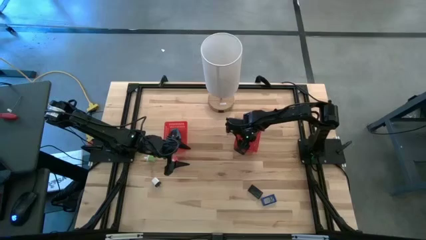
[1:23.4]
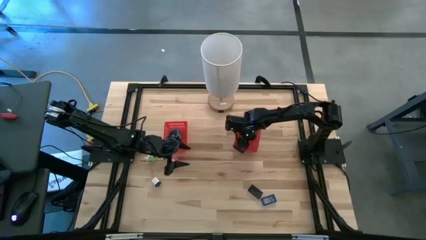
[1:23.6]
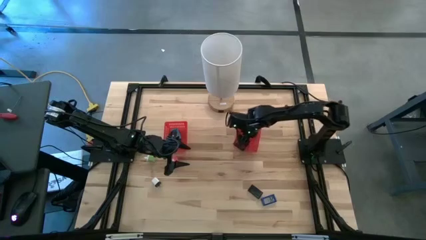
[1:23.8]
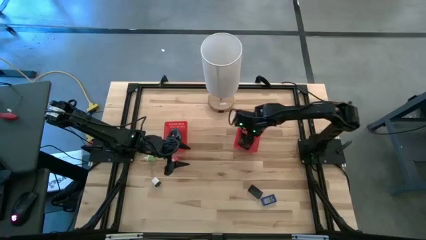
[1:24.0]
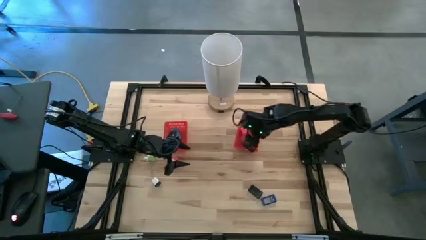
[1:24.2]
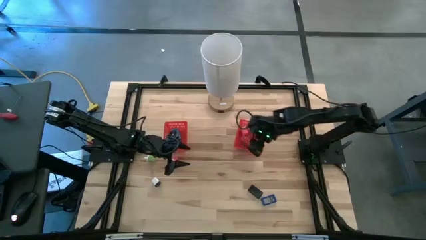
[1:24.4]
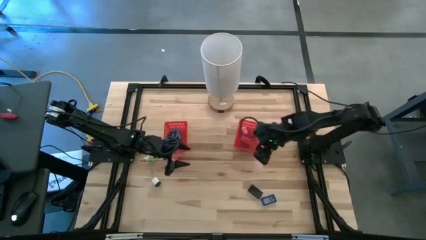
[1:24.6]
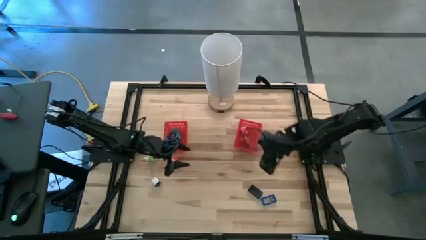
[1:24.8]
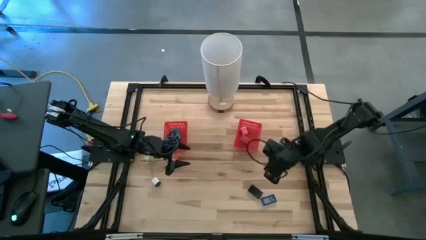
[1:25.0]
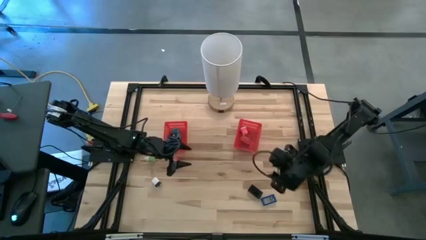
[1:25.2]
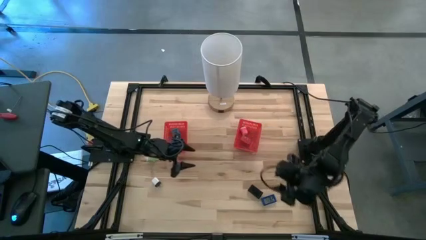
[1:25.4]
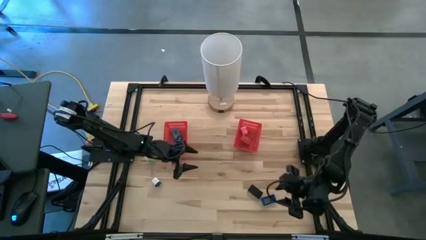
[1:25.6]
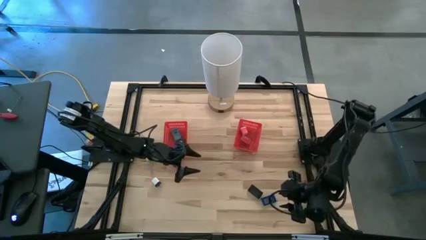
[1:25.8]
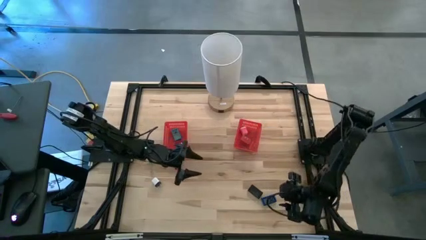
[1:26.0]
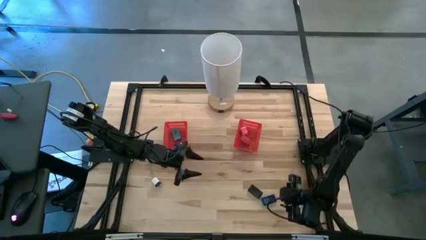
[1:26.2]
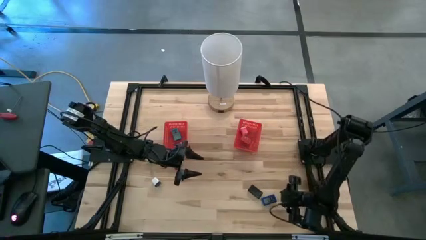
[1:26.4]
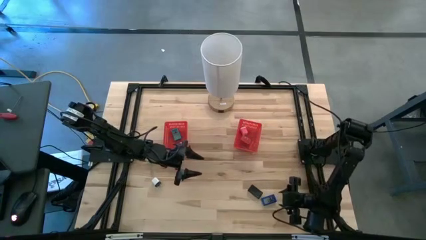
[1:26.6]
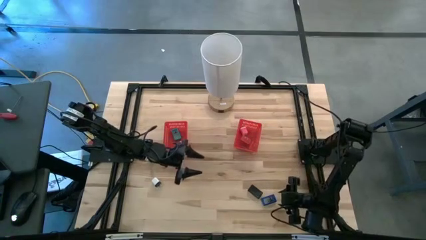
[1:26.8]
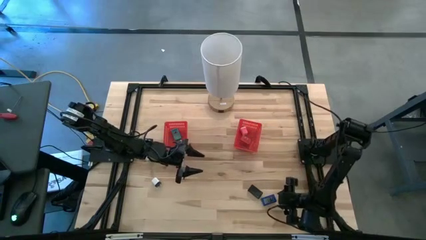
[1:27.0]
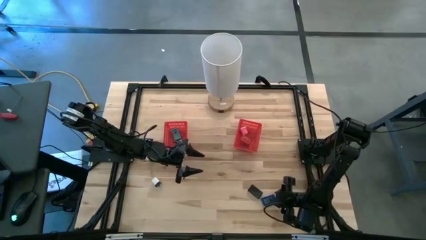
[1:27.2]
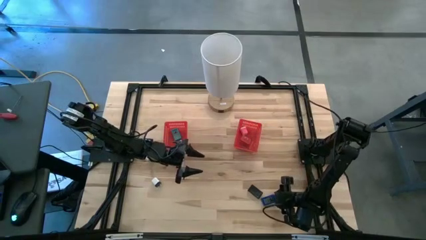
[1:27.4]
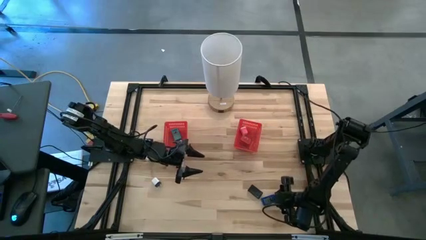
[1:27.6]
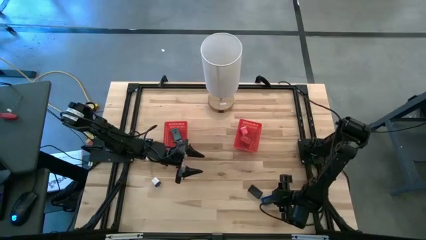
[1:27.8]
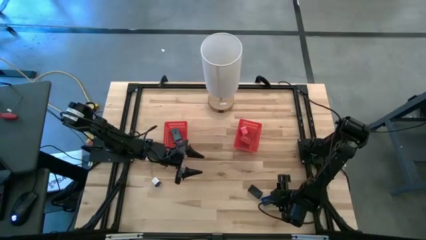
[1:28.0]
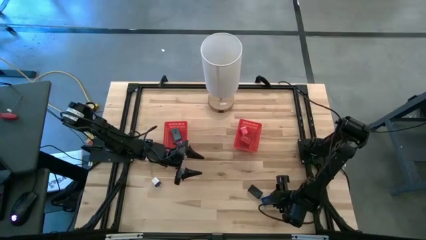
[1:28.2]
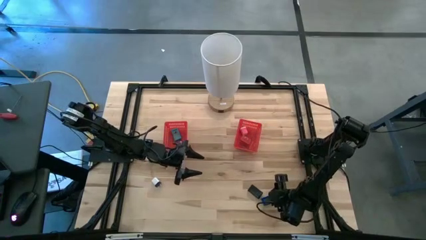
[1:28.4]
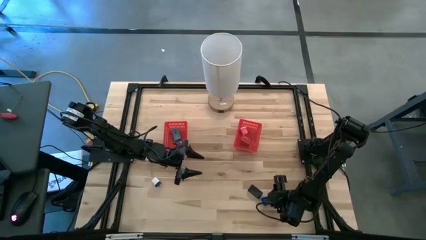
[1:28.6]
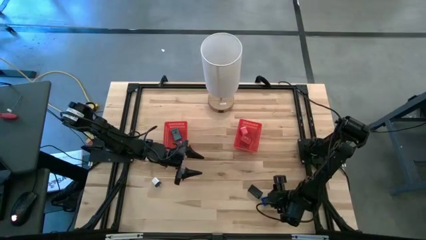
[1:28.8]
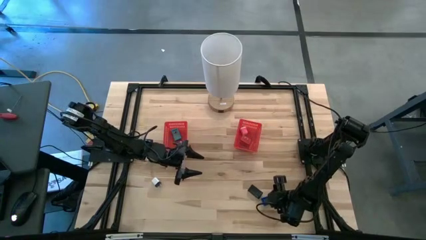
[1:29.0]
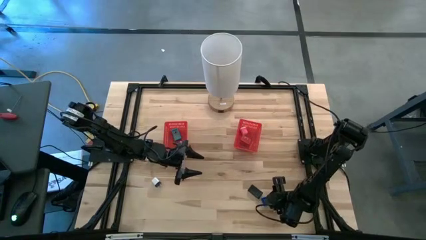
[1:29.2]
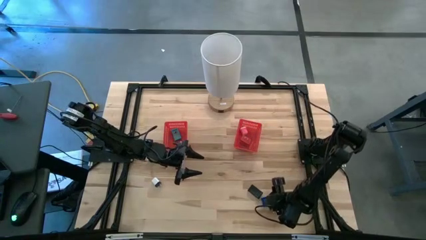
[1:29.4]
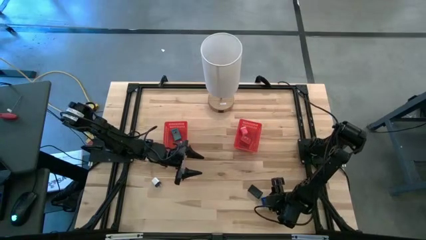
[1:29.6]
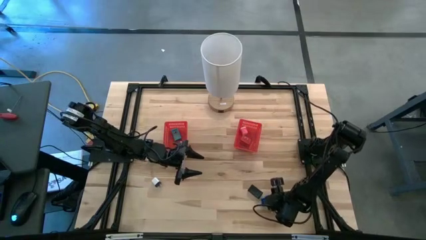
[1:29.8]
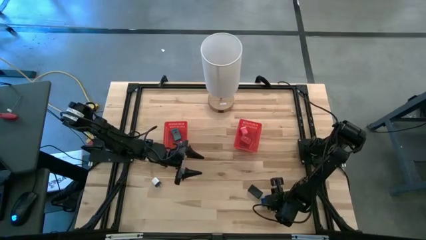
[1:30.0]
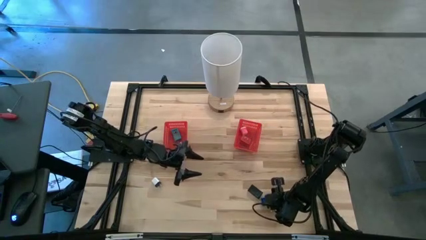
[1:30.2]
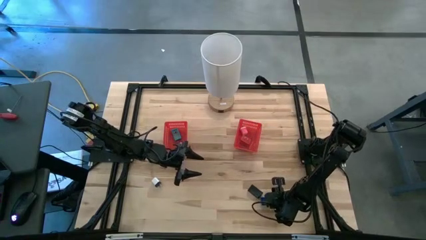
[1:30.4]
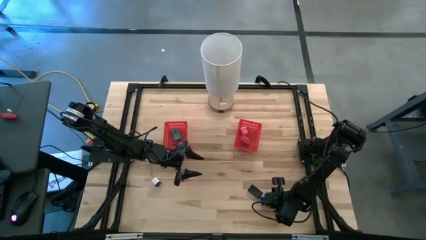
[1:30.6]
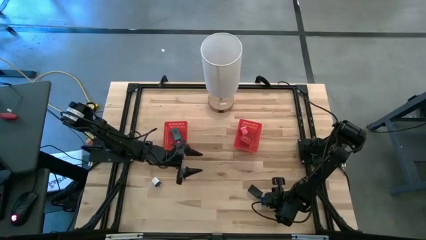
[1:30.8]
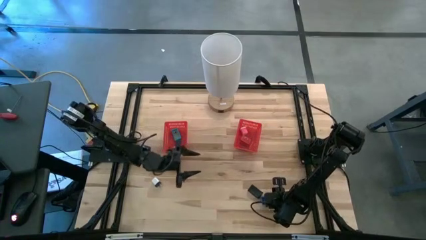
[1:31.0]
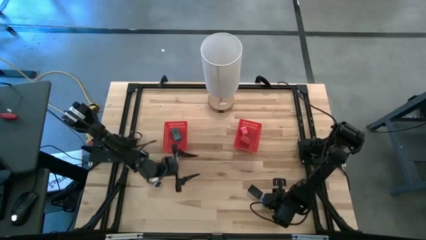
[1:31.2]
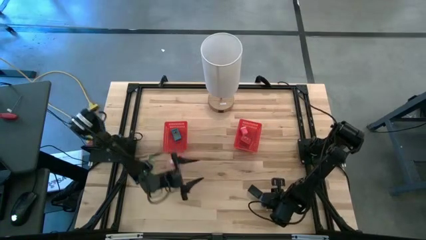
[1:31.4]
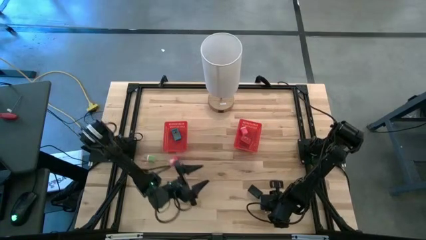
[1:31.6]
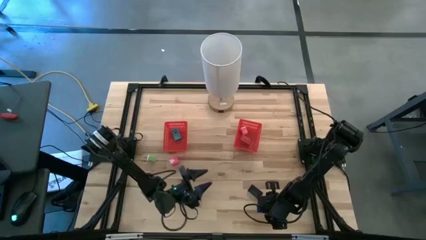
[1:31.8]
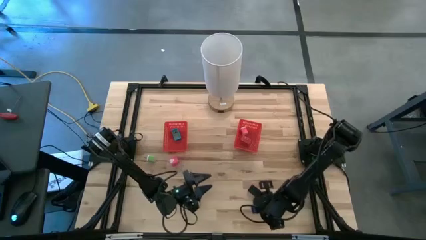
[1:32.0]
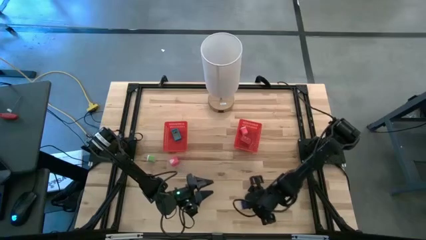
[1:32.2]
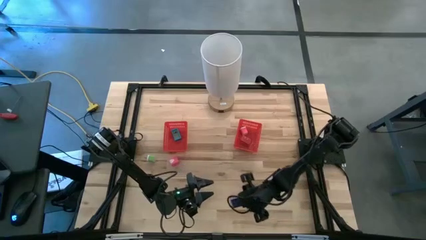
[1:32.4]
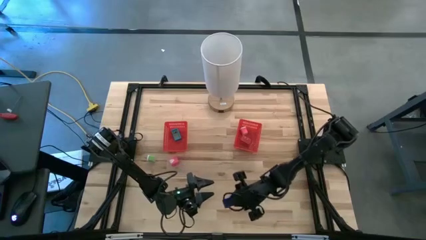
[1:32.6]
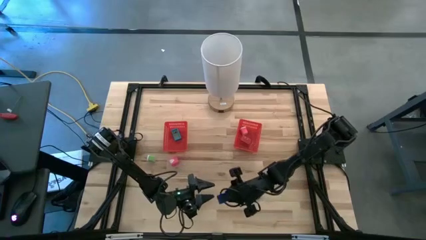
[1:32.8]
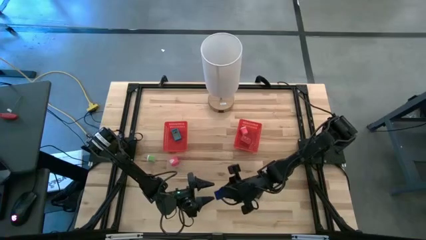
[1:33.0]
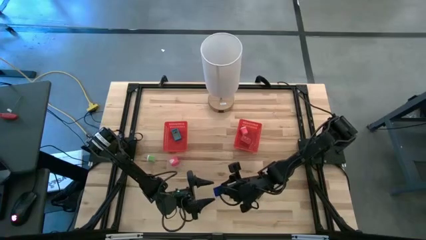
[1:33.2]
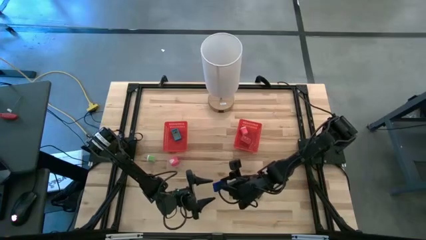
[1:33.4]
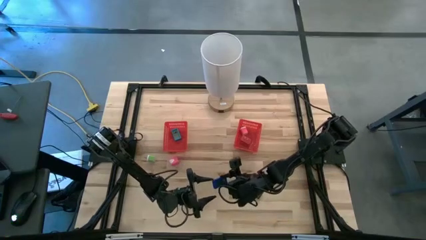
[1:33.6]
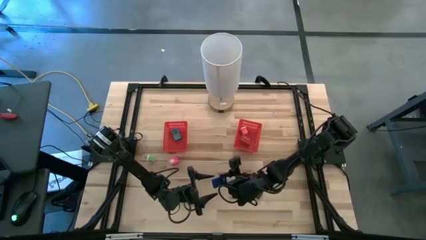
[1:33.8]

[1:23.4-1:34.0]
Task: Pick & Place Office items
Put the dark blue digital timer into the left red bin

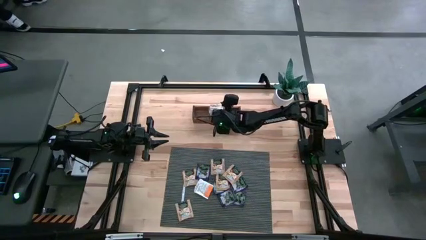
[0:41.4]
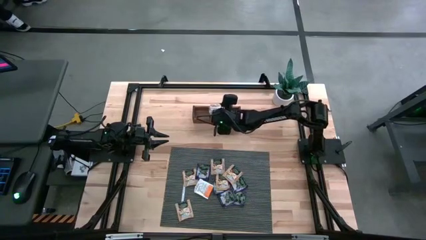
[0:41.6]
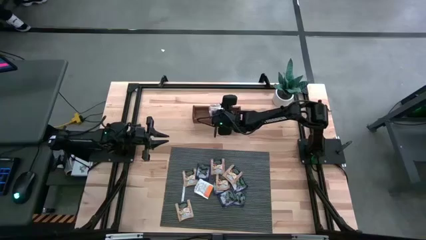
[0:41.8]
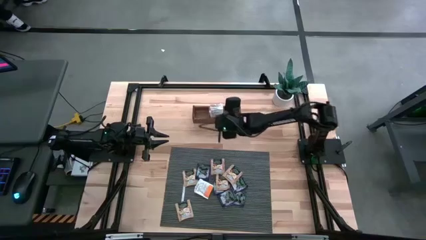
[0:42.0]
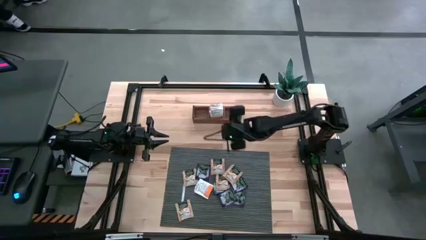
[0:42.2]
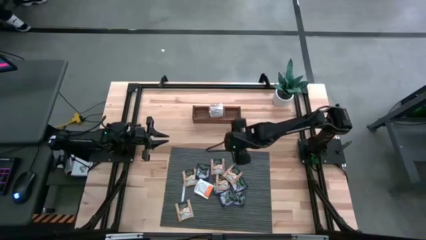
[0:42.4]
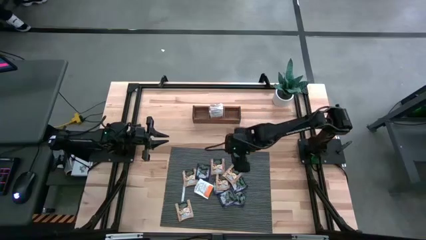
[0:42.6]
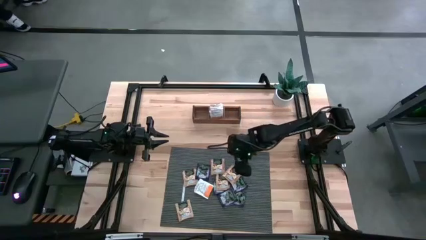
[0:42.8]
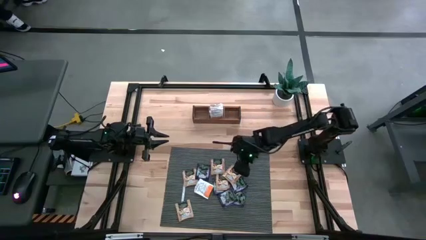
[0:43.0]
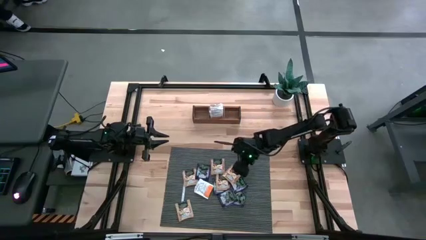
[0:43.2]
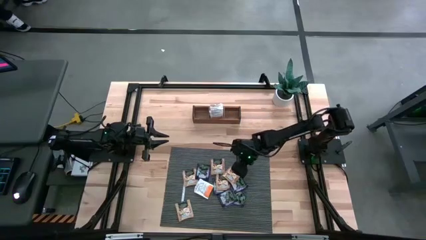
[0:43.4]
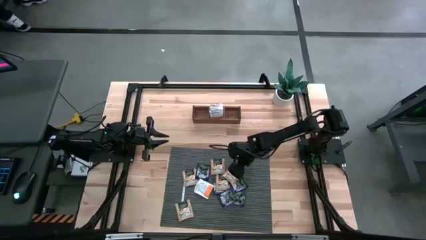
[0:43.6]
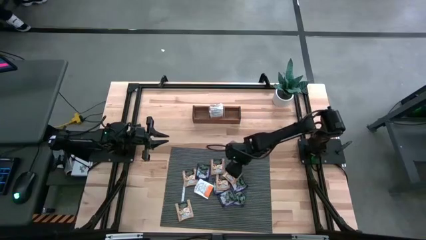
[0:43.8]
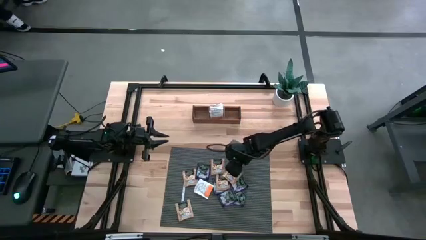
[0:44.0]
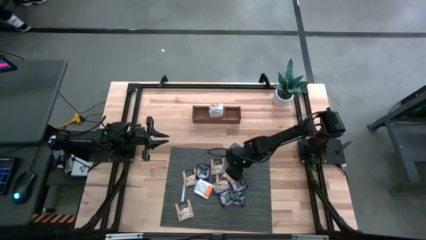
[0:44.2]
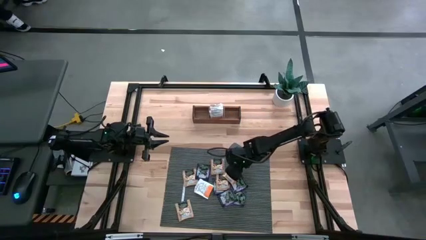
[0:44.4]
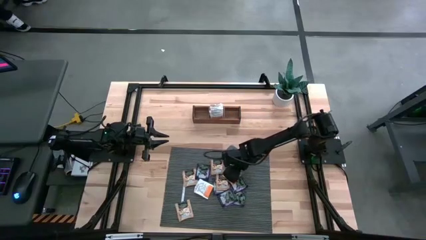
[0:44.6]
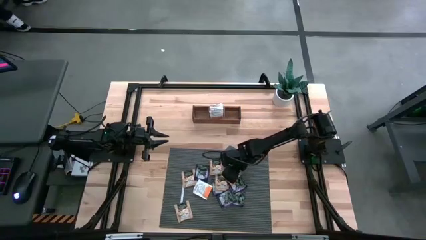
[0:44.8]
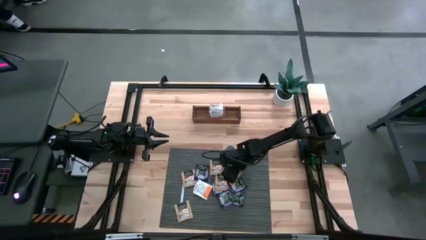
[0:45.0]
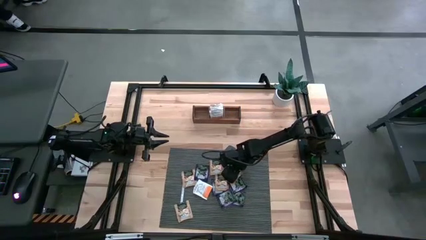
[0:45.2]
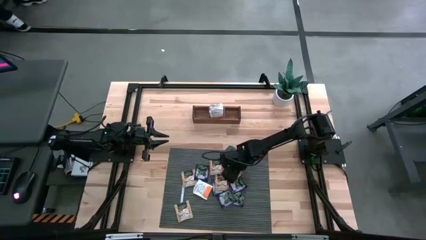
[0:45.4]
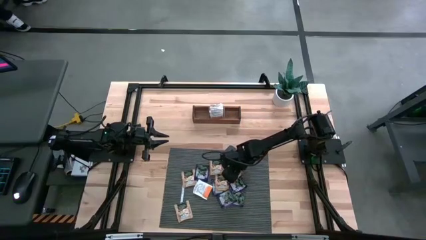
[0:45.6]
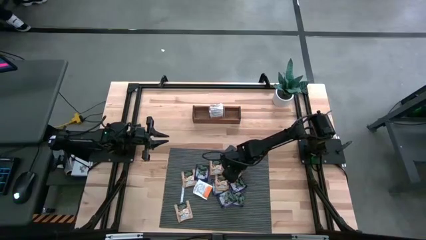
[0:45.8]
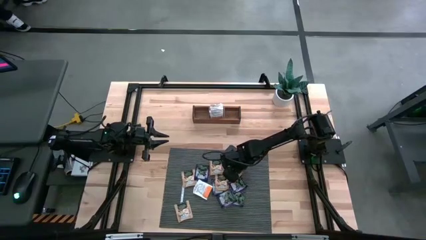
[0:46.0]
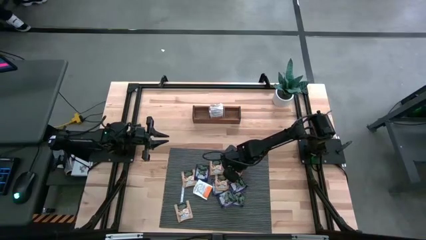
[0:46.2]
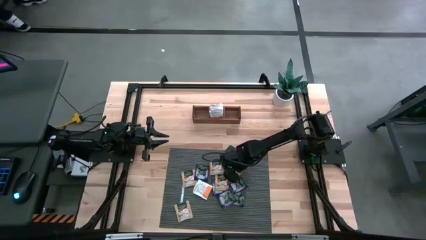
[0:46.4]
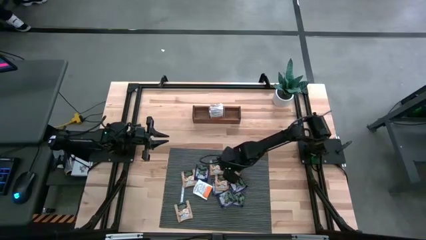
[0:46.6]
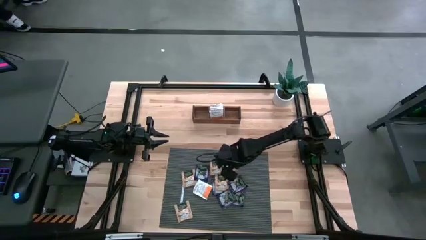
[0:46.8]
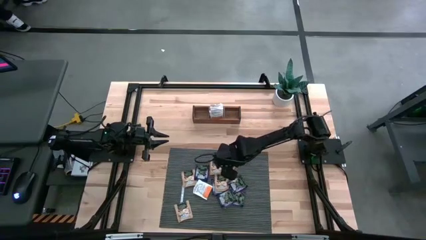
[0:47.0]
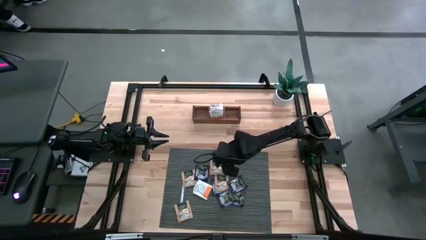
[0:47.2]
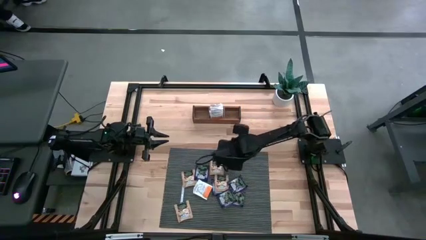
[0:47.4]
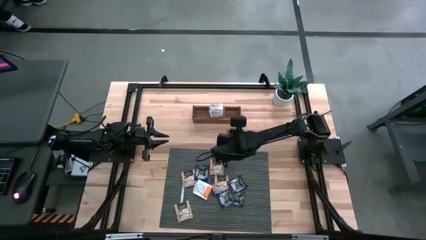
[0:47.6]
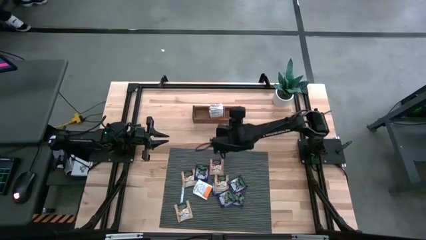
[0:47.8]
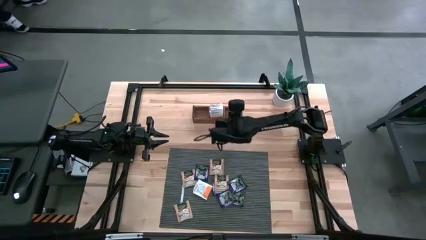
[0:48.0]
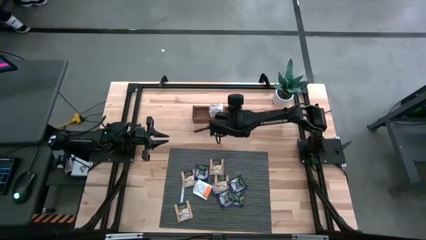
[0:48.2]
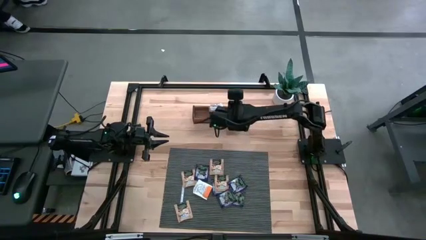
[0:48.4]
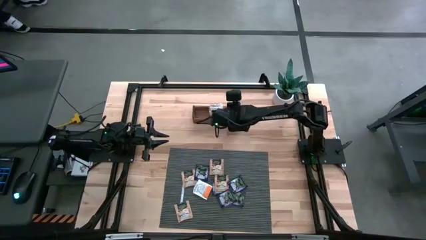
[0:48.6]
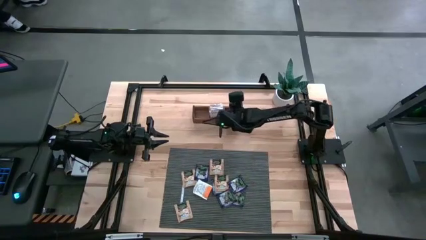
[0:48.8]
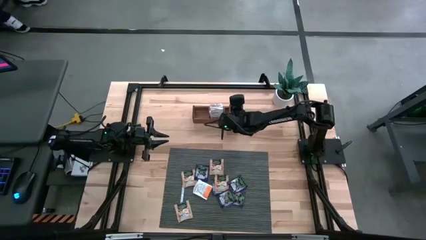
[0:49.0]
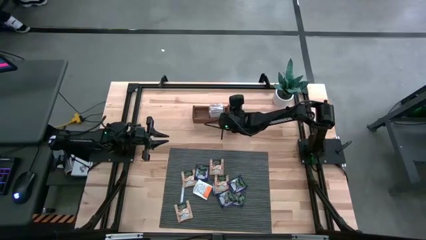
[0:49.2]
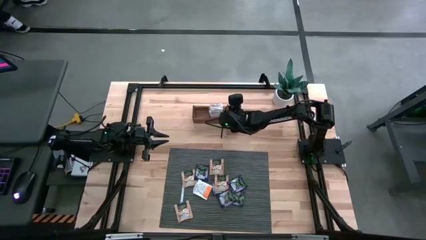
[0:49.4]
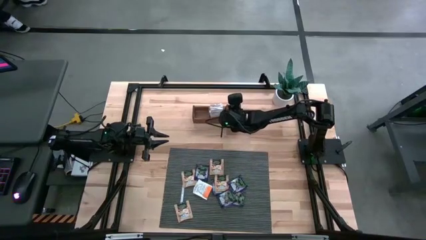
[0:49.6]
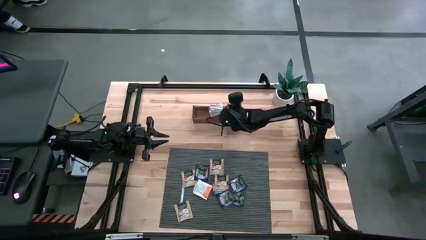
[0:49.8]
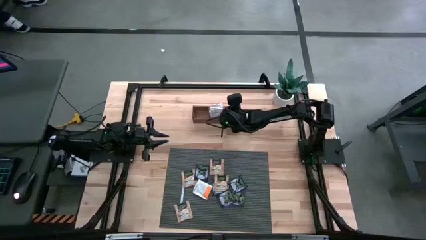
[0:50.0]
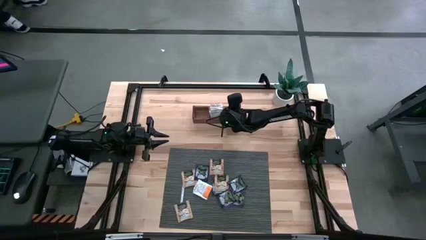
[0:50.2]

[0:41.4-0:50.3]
Task: Pick & Place Tea
Put the light brown tea bag into the right compartment of the wooden organizer
